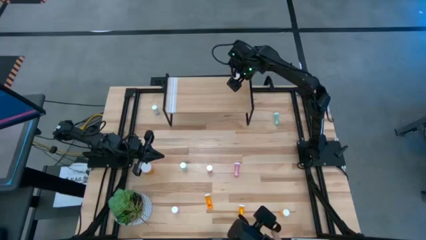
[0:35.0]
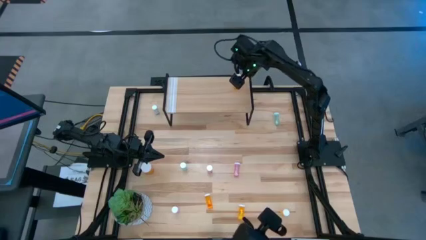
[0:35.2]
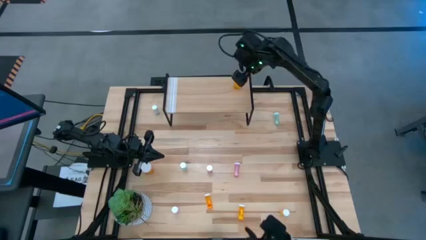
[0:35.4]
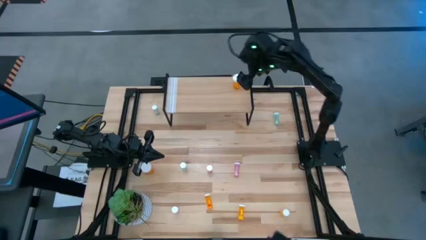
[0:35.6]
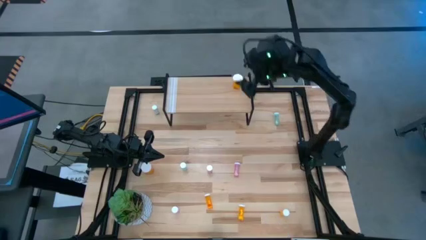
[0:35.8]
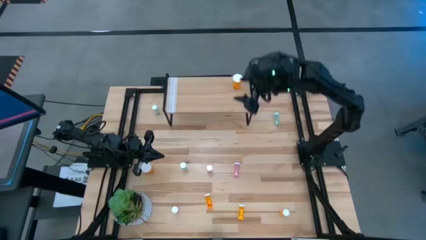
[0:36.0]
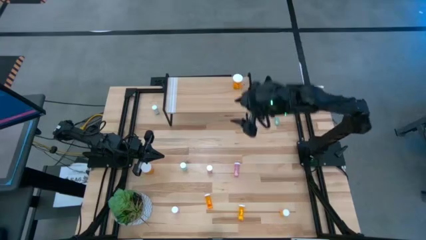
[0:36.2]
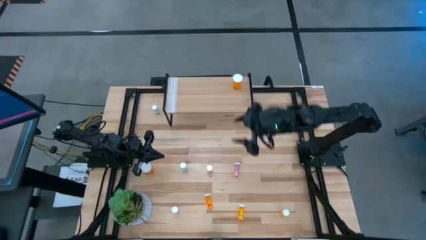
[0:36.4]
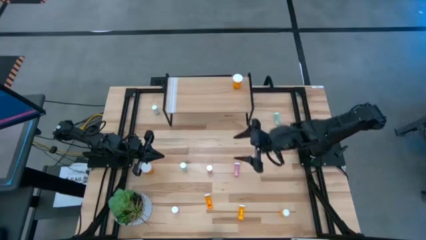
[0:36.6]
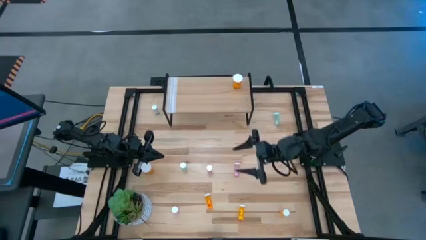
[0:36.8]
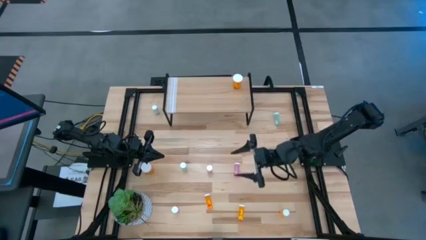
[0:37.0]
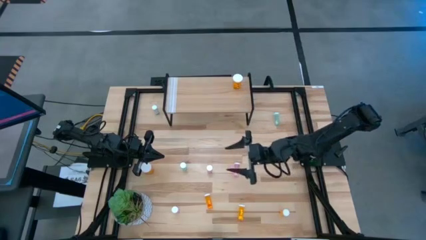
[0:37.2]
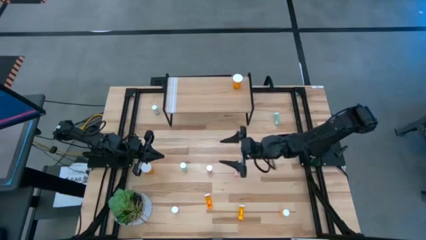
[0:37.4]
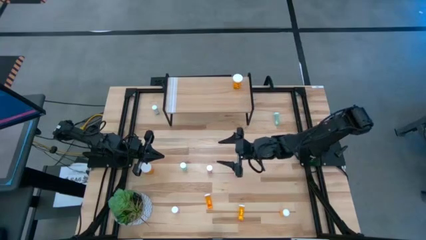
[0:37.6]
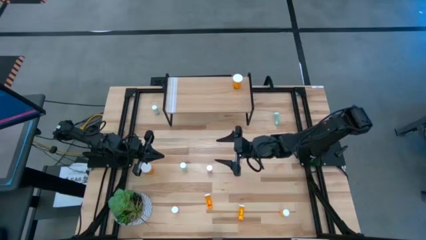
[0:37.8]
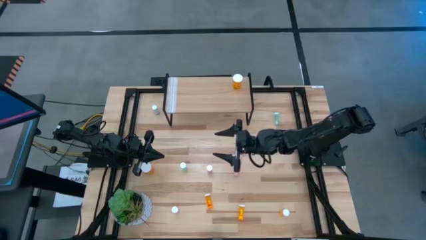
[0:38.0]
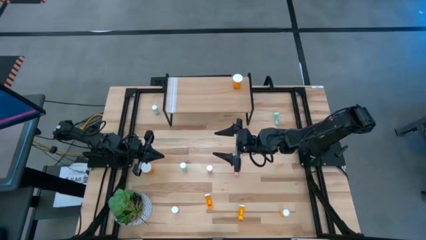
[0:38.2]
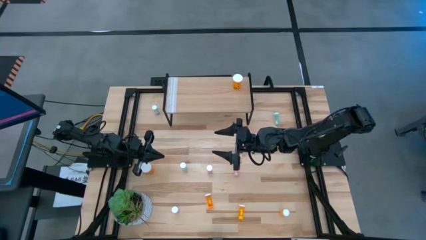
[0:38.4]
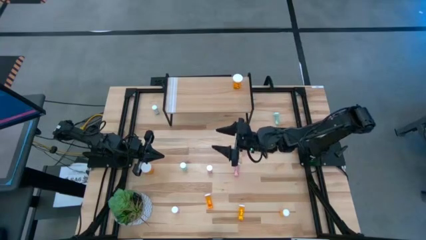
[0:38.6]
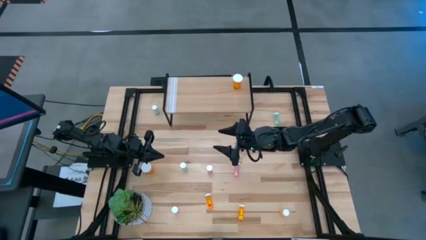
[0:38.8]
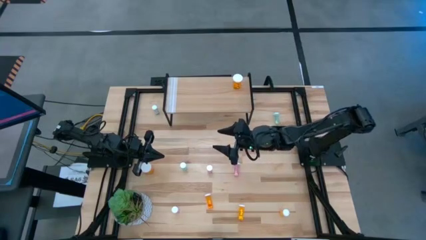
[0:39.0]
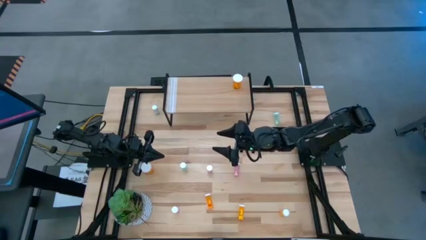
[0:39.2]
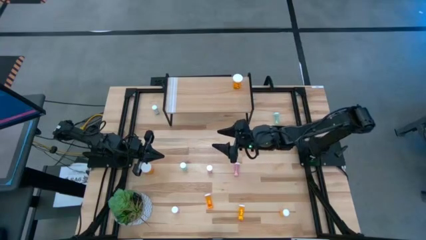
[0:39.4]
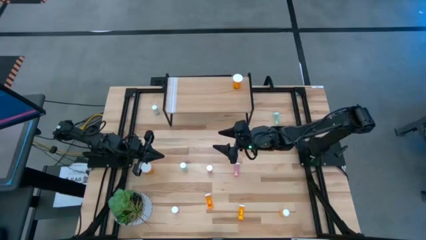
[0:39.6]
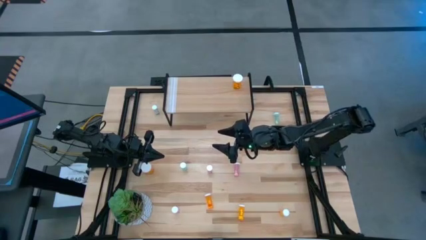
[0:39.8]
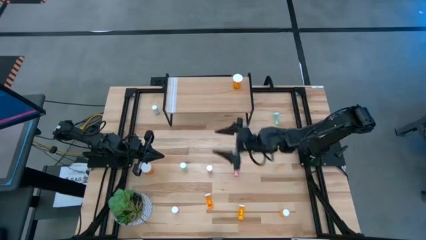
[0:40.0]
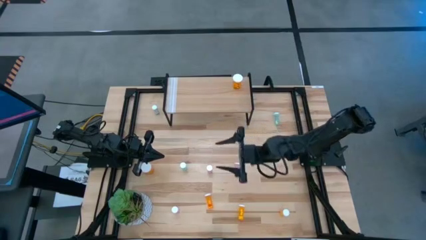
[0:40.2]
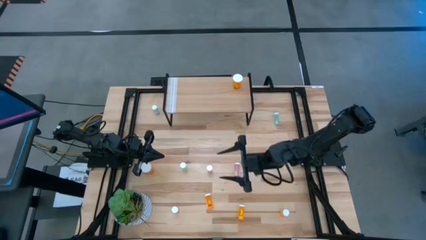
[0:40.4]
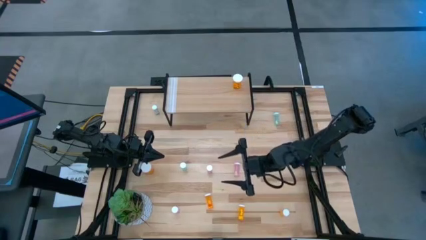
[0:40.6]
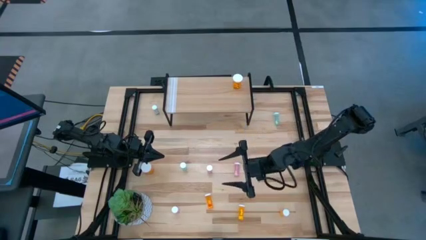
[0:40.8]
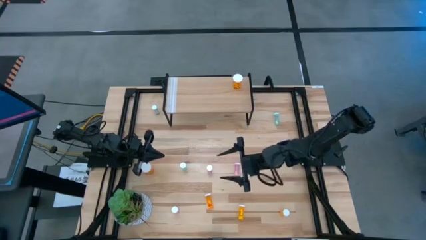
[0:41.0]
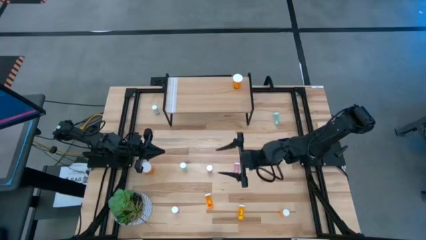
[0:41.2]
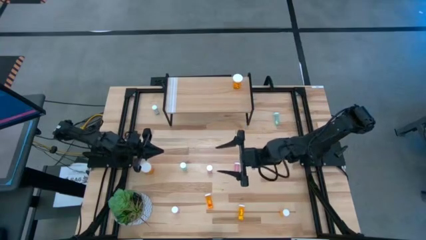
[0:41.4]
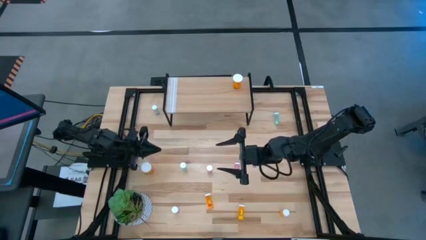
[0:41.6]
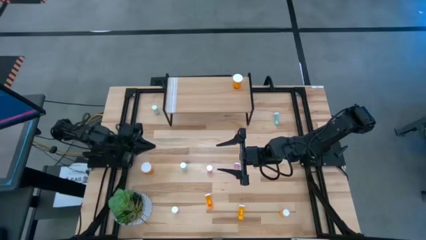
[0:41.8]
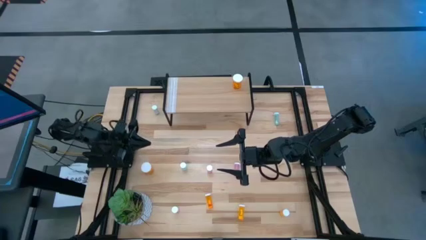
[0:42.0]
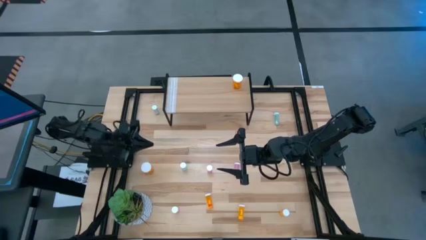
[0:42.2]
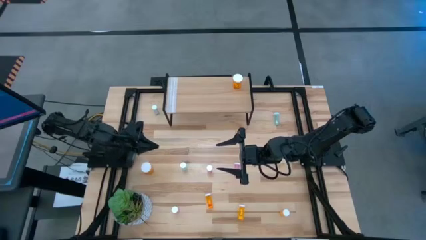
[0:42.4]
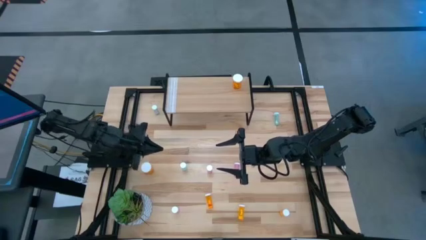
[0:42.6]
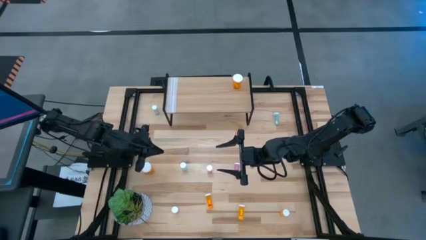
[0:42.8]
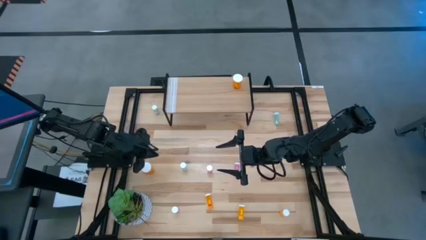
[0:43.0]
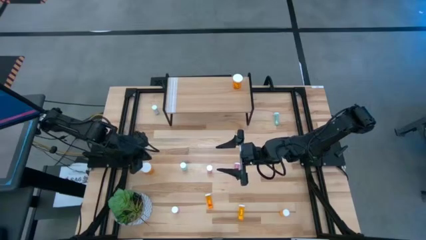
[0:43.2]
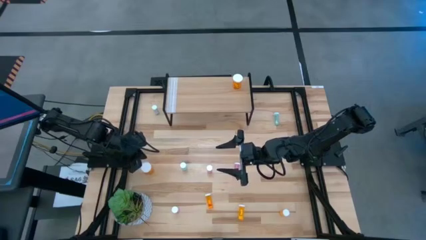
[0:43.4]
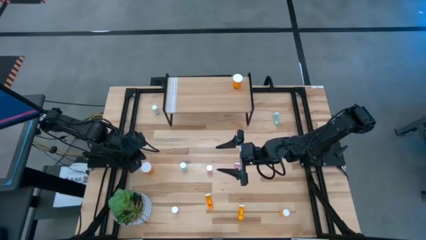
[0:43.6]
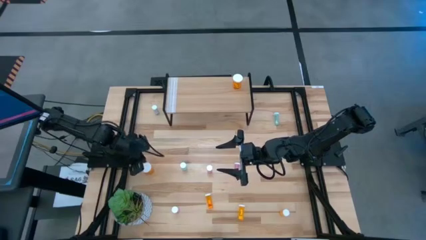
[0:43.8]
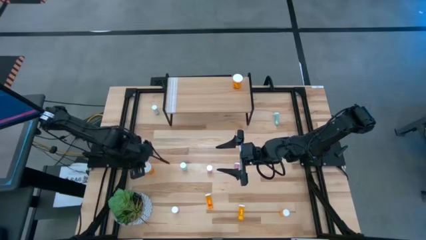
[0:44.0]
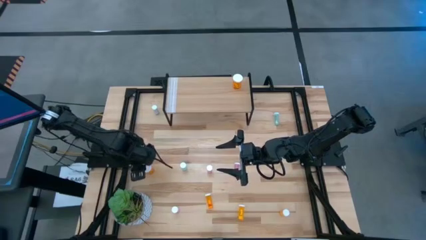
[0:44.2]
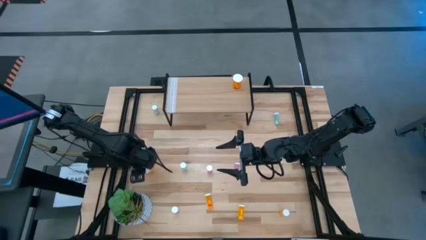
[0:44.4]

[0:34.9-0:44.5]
Task: Pick and place medicine bottles onto shelf by color
Put the large orange pill bottle on the shelf aligned with the other large orange pill bottle

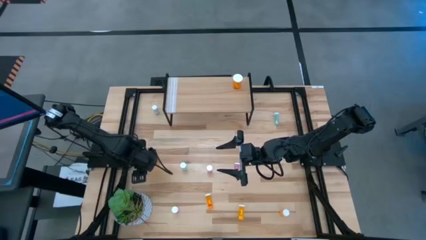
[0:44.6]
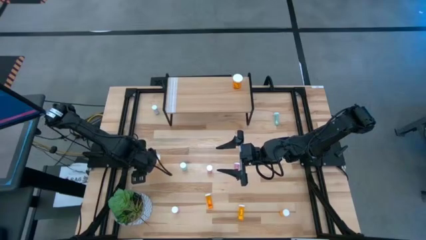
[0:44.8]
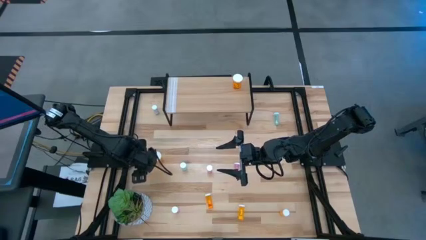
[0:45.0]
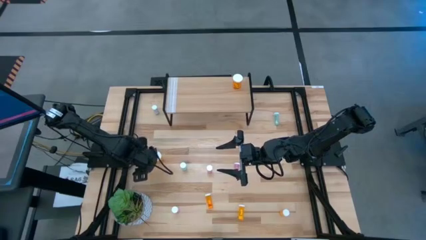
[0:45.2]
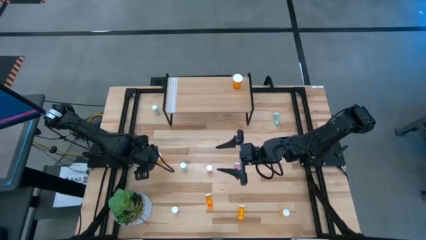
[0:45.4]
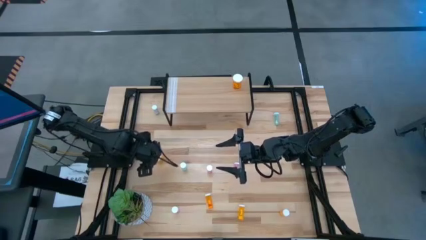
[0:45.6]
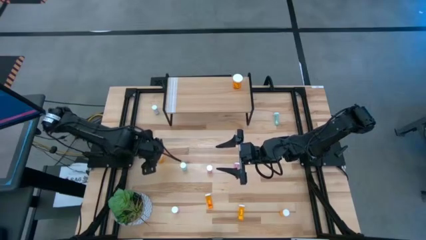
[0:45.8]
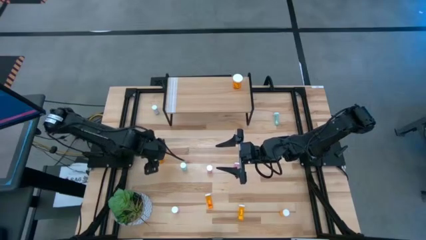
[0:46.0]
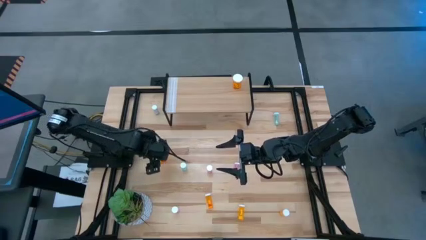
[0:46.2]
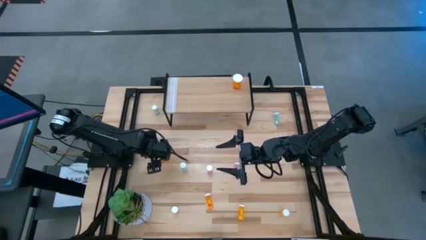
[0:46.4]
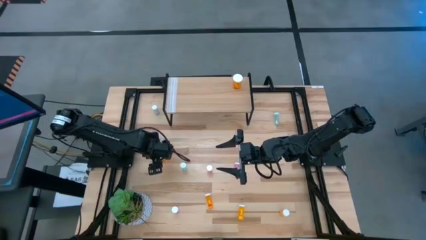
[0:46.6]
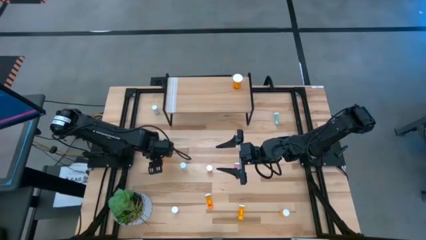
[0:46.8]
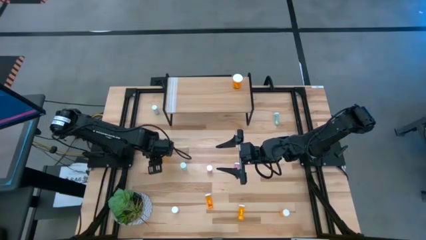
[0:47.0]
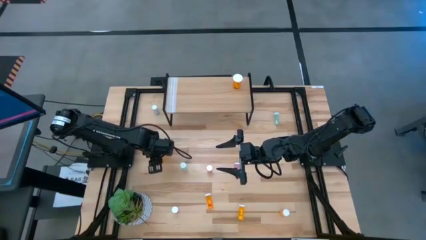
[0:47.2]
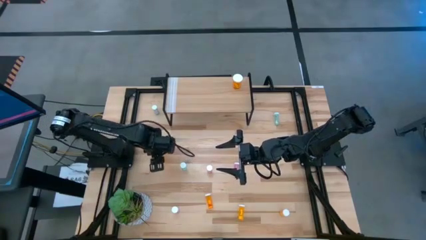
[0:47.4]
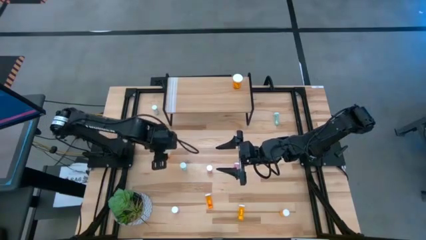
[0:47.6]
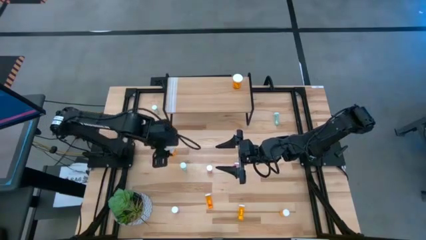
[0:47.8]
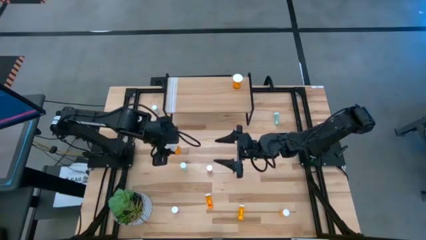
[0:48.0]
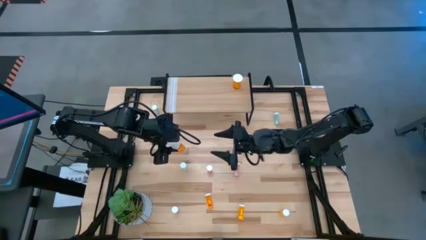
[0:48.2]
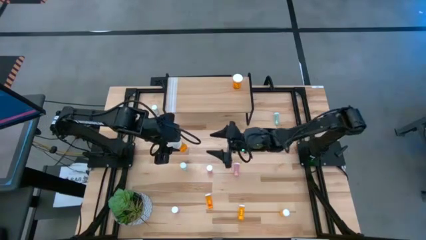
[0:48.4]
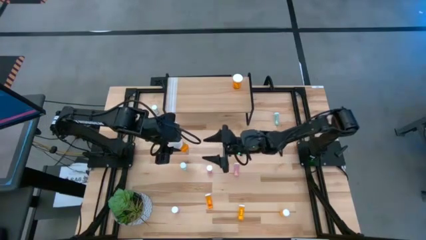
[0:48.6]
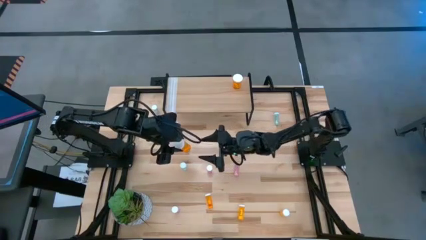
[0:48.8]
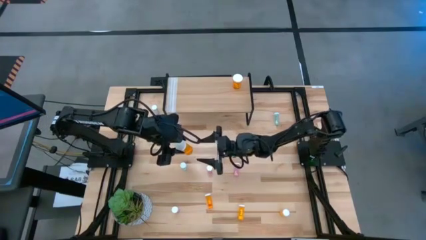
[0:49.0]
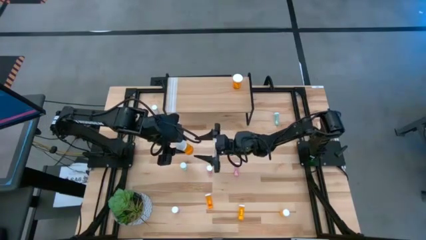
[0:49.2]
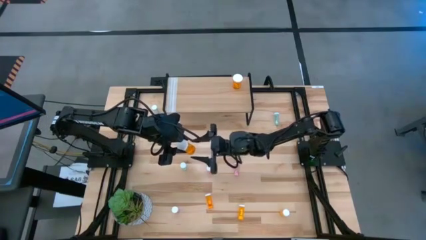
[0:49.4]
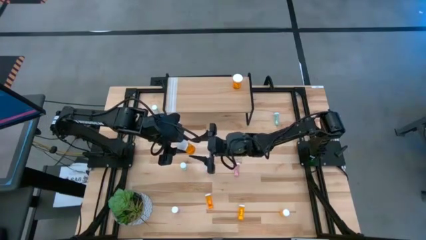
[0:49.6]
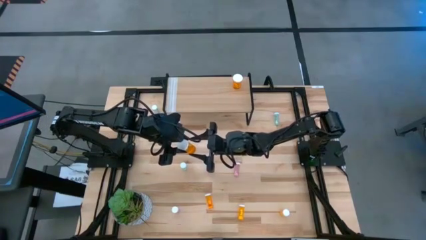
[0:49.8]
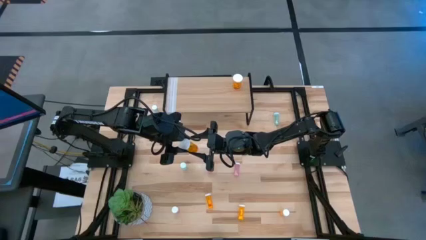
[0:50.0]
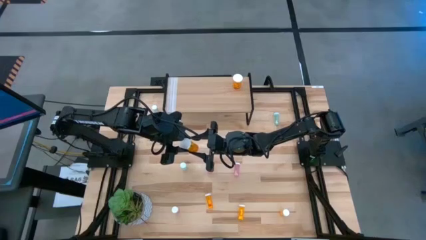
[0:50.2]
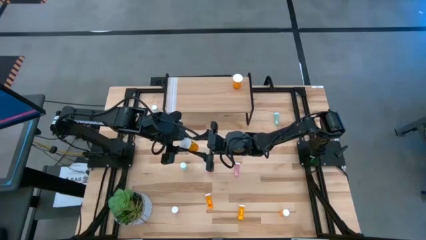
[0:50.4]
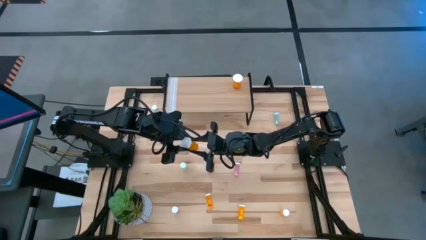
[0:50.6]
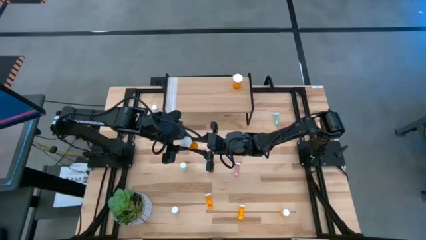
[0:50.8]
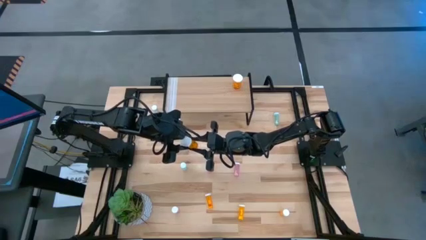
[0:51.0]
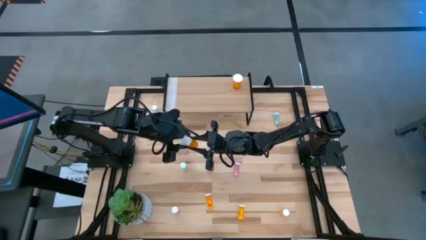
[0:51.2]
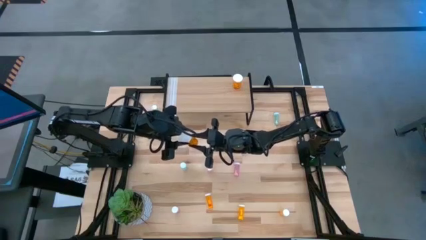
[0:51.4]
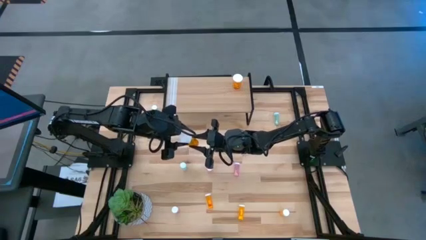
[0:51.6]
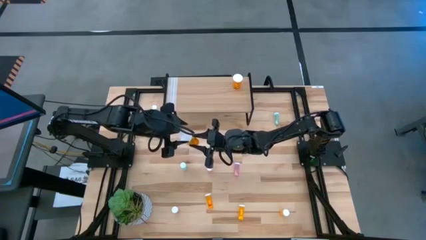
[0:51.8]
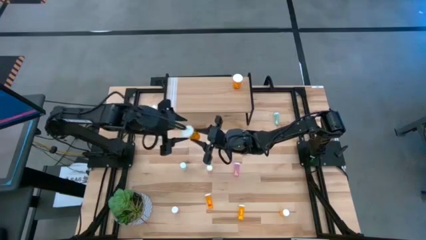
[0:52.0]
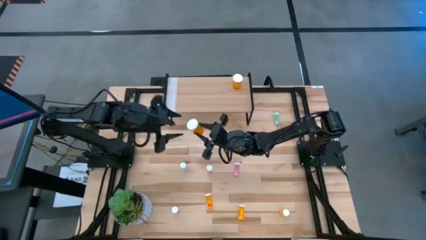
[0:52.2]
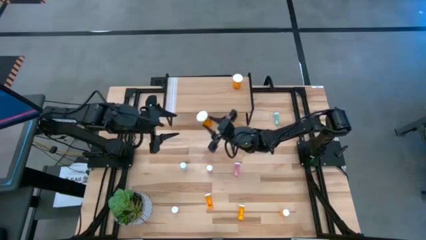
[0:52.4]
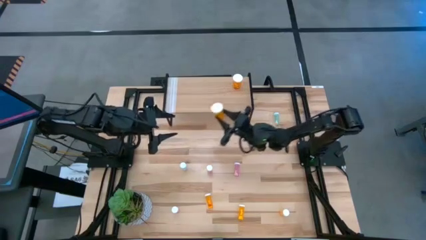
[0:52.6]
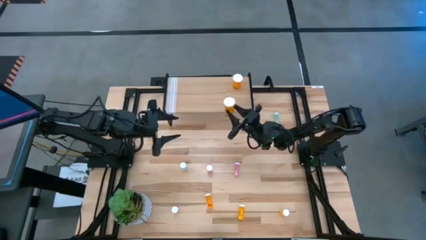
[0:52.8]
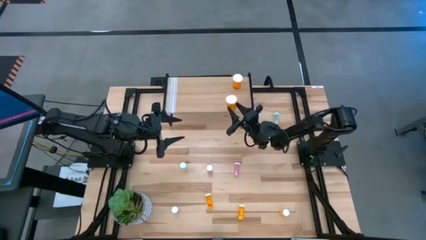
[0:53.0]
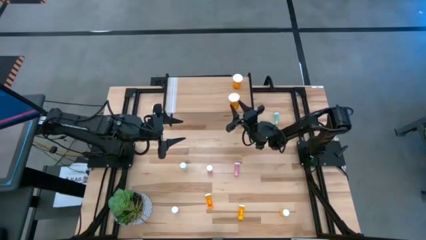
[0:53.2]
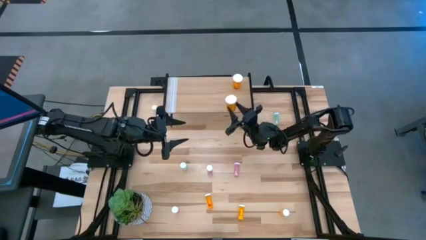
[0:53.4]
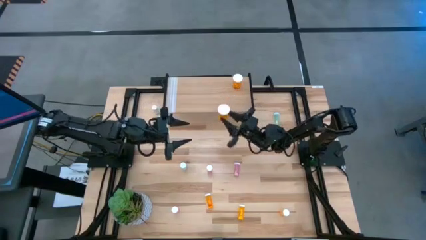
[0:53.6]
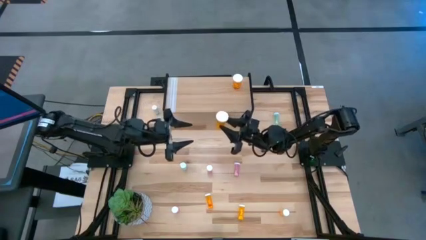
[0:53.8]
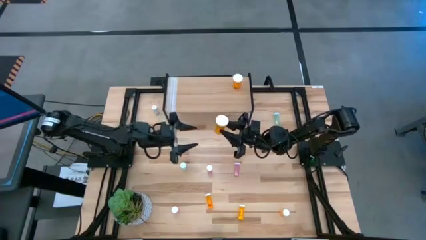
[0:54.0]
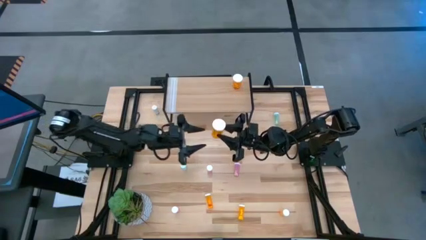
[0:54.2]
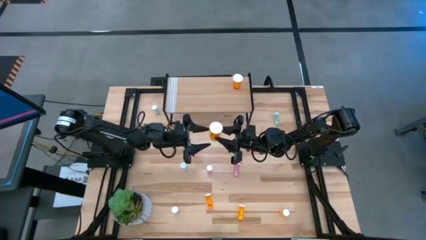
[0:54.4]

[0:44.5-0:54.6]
Put the large orange pill bottle on the shelf aligned with the other large orange pill bottle
